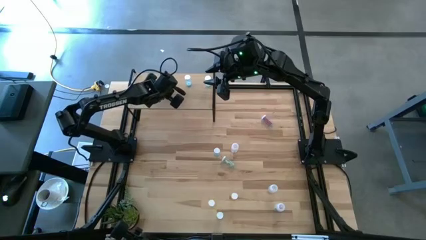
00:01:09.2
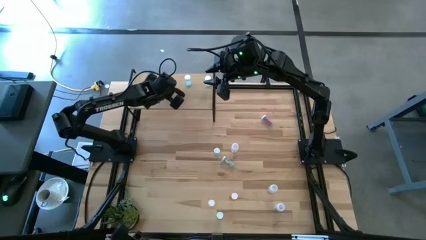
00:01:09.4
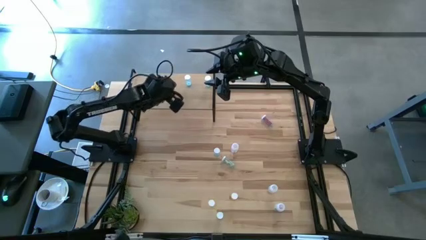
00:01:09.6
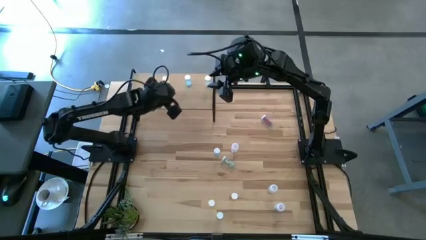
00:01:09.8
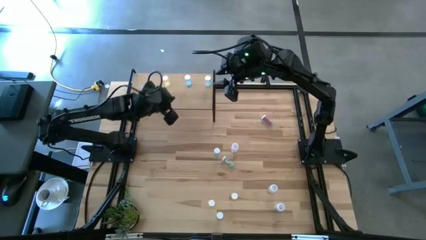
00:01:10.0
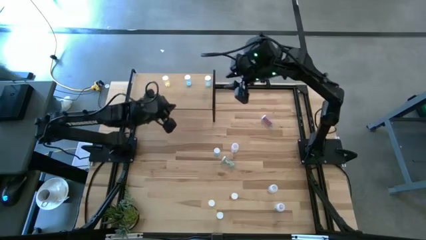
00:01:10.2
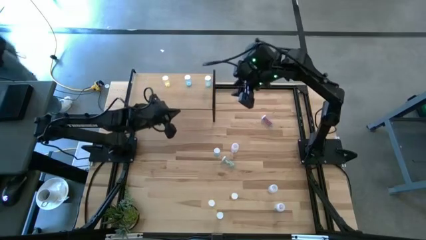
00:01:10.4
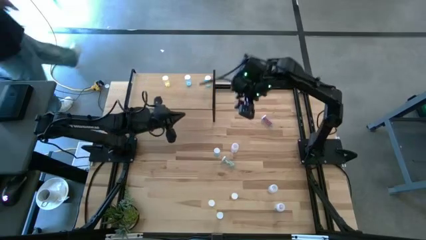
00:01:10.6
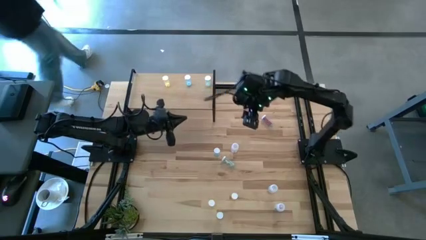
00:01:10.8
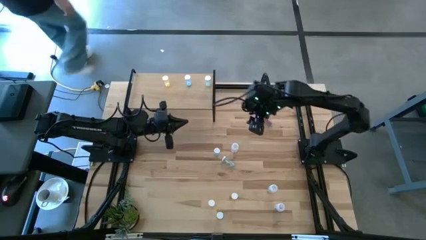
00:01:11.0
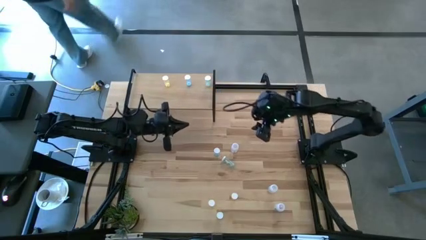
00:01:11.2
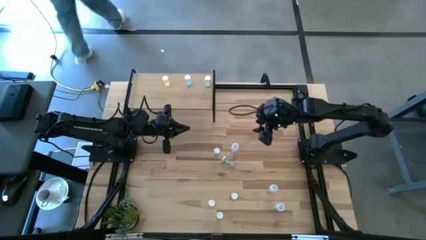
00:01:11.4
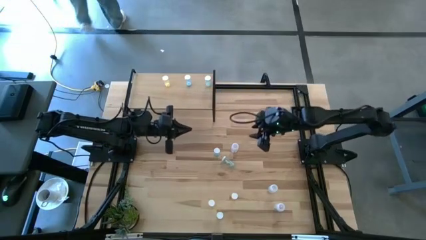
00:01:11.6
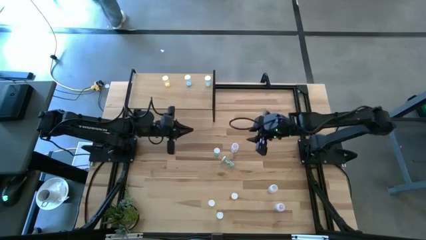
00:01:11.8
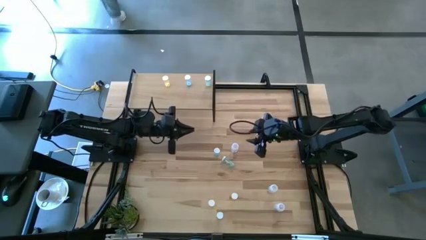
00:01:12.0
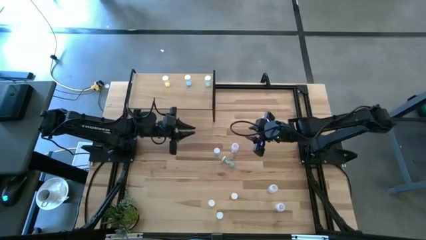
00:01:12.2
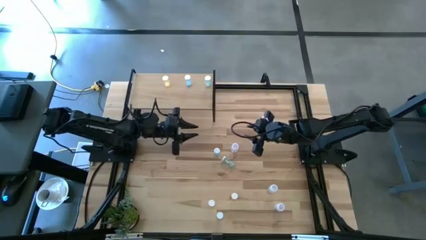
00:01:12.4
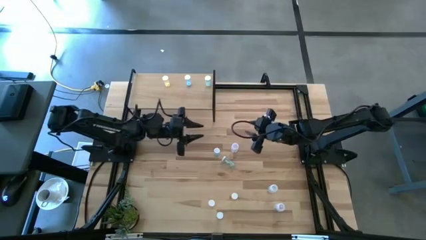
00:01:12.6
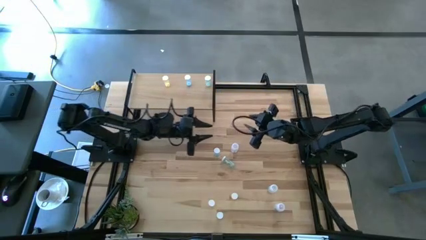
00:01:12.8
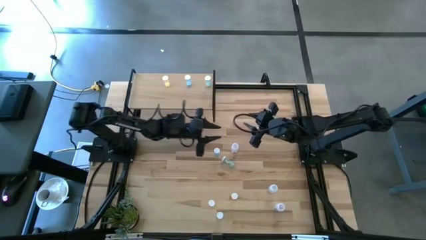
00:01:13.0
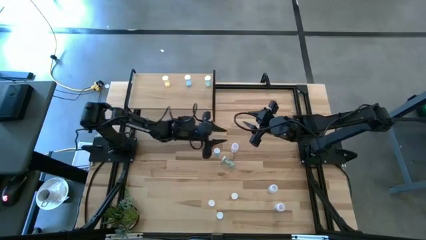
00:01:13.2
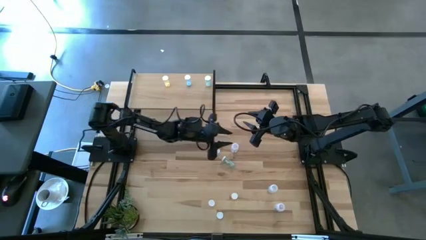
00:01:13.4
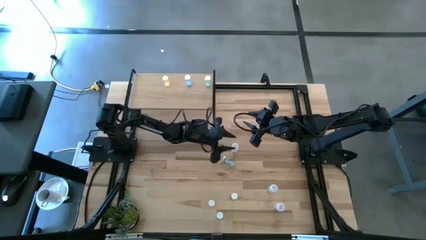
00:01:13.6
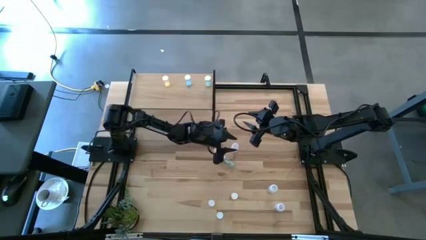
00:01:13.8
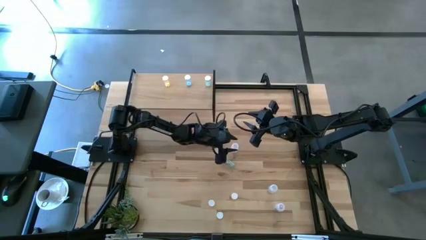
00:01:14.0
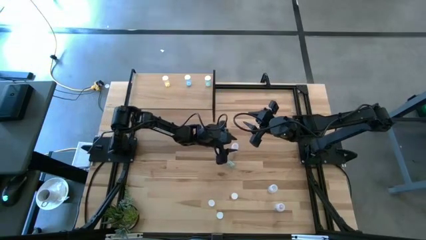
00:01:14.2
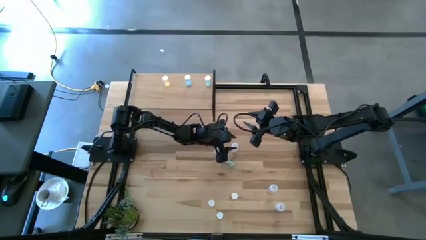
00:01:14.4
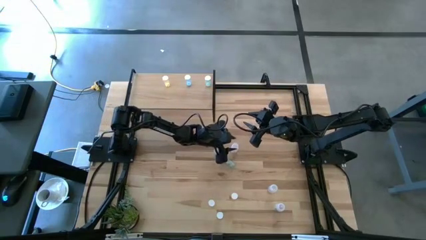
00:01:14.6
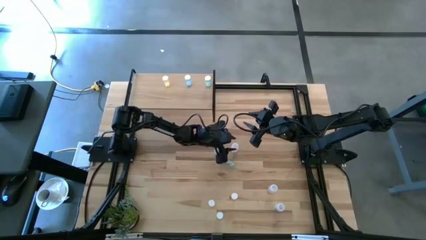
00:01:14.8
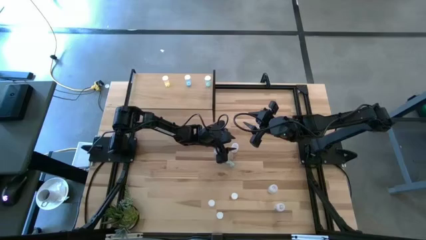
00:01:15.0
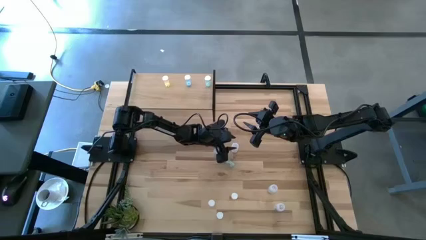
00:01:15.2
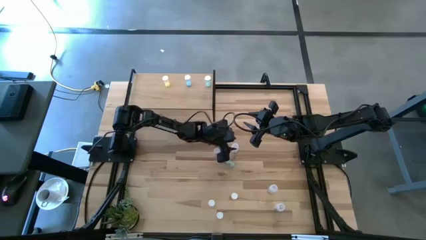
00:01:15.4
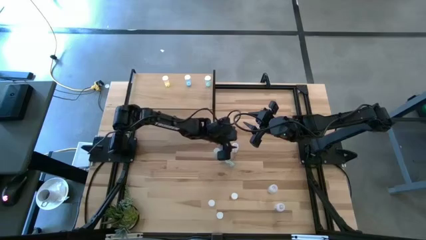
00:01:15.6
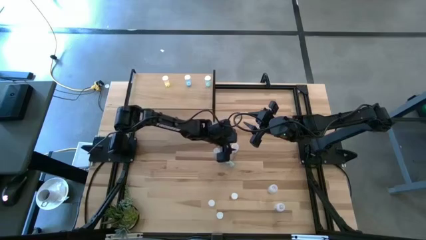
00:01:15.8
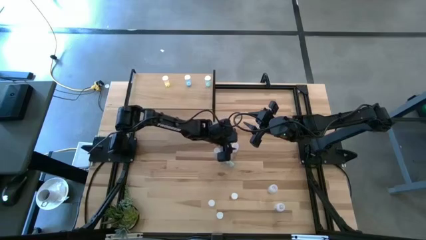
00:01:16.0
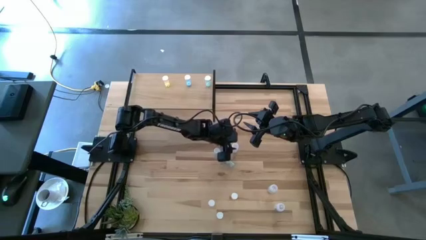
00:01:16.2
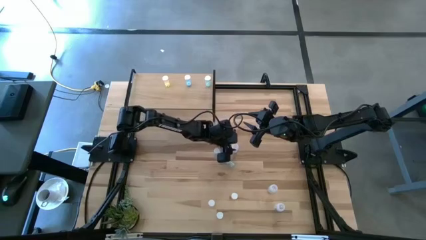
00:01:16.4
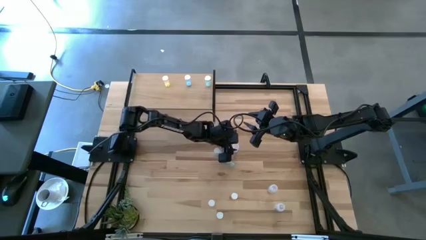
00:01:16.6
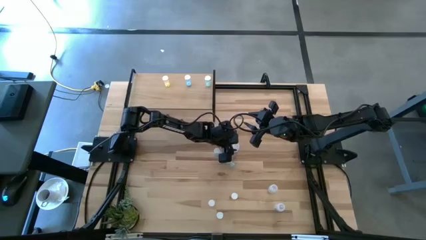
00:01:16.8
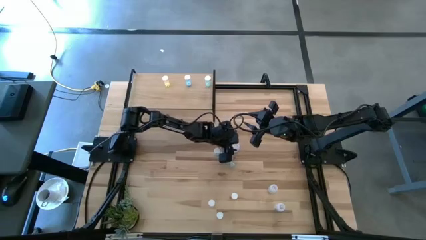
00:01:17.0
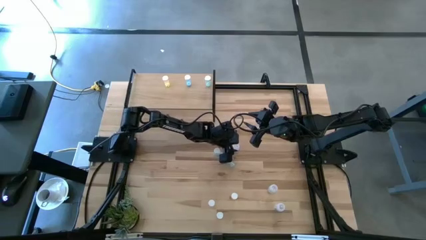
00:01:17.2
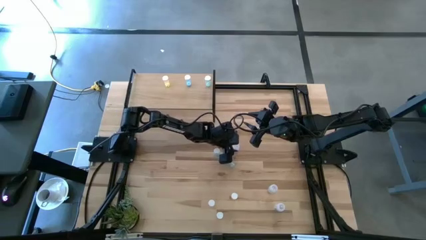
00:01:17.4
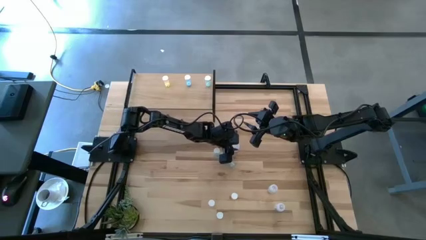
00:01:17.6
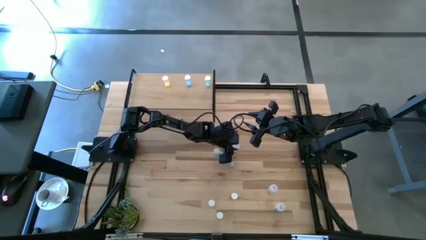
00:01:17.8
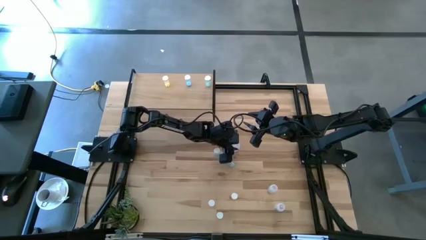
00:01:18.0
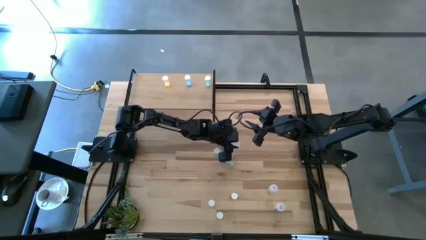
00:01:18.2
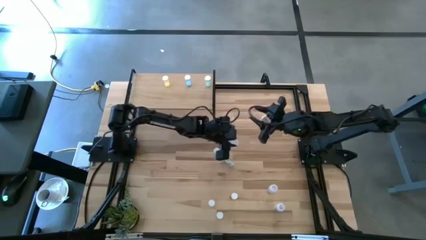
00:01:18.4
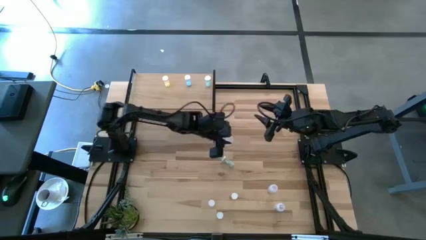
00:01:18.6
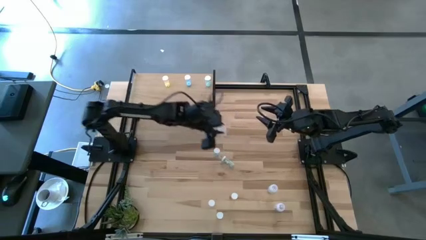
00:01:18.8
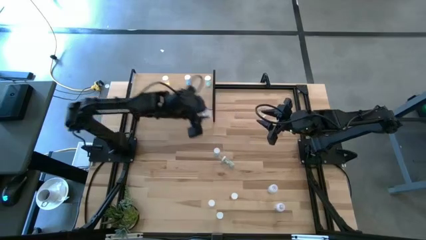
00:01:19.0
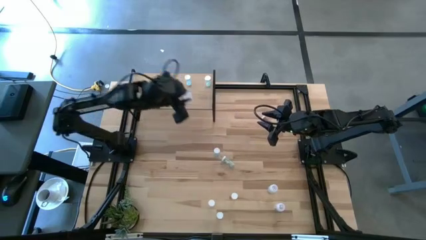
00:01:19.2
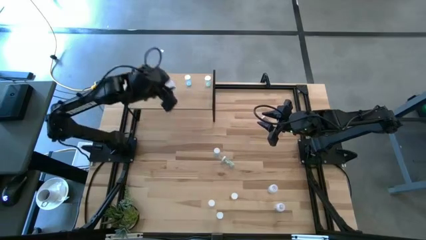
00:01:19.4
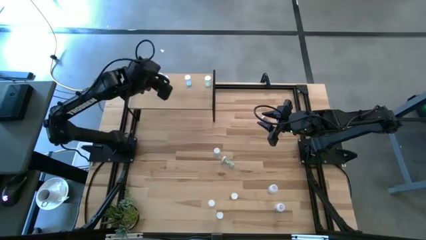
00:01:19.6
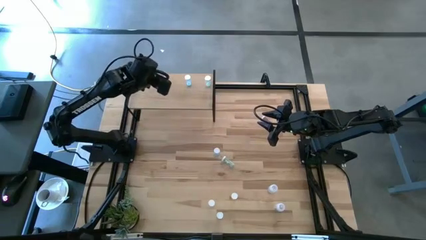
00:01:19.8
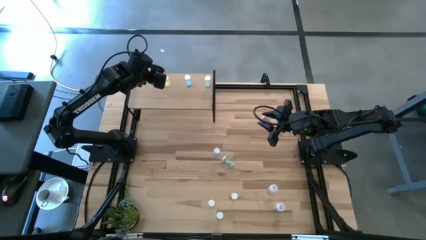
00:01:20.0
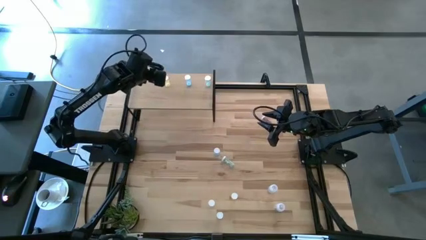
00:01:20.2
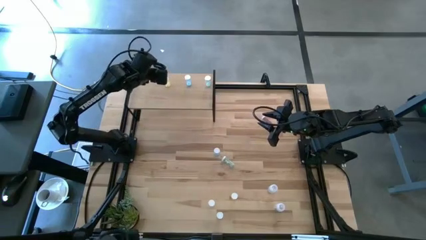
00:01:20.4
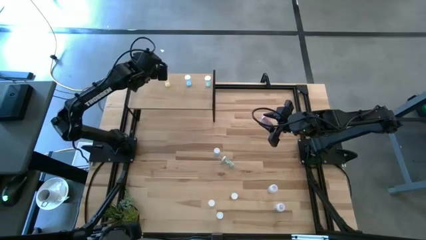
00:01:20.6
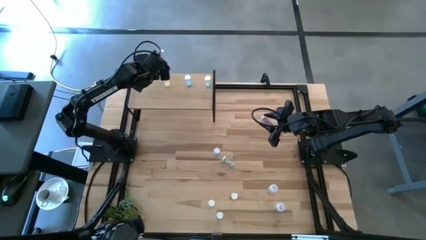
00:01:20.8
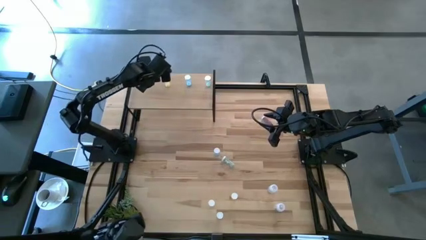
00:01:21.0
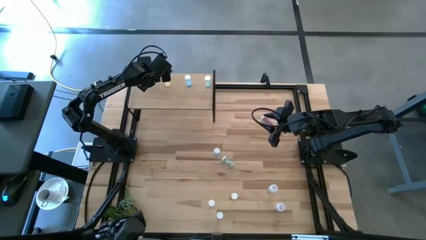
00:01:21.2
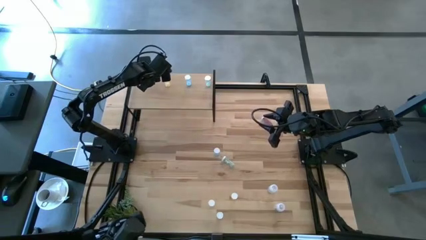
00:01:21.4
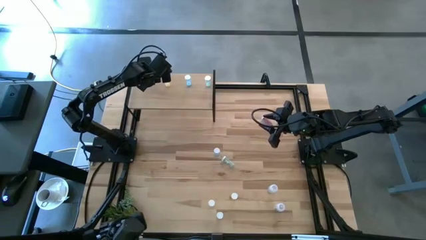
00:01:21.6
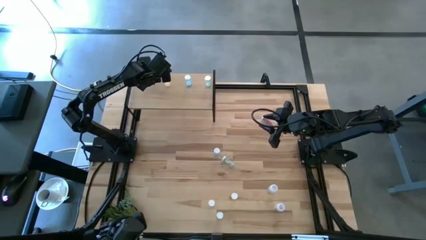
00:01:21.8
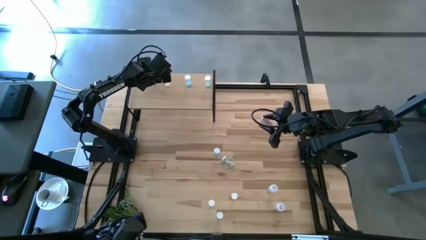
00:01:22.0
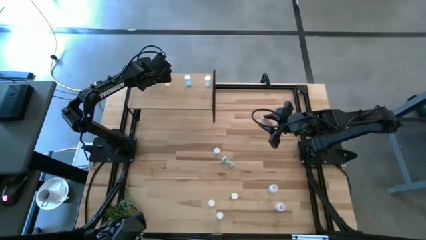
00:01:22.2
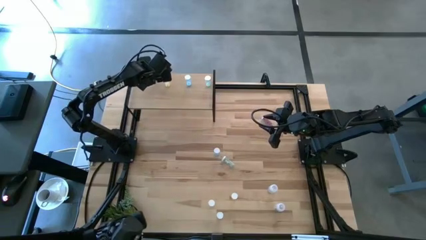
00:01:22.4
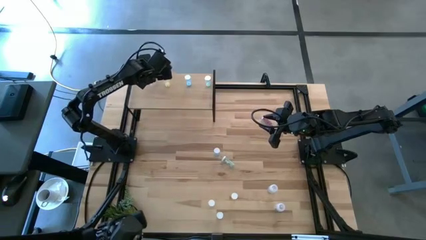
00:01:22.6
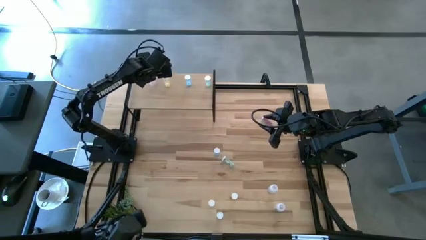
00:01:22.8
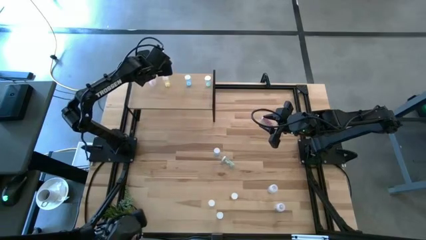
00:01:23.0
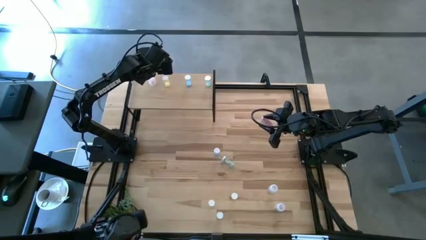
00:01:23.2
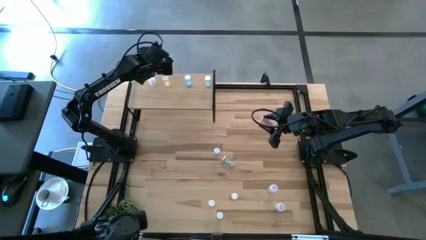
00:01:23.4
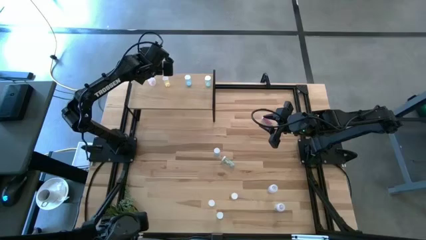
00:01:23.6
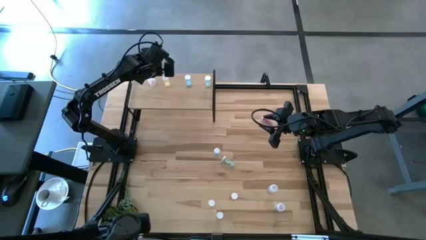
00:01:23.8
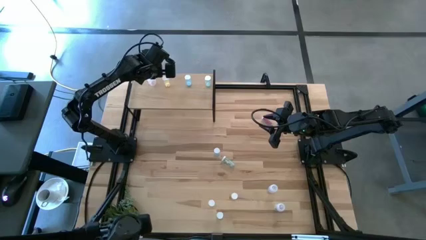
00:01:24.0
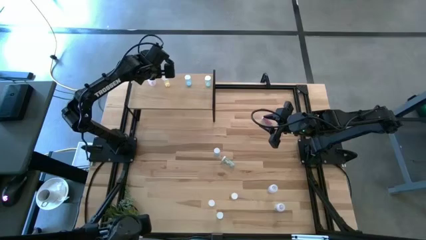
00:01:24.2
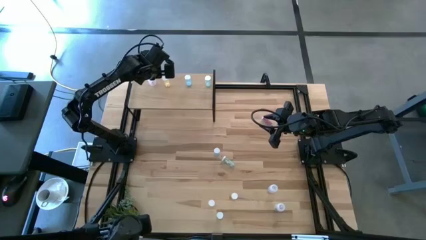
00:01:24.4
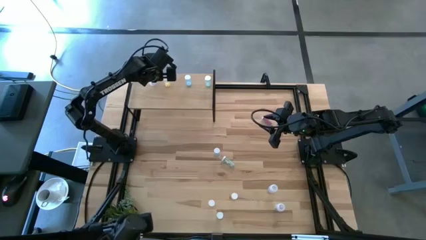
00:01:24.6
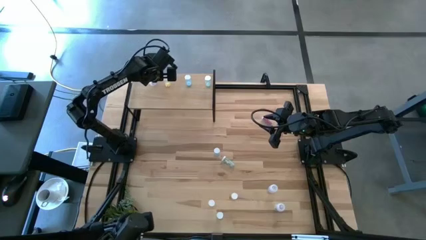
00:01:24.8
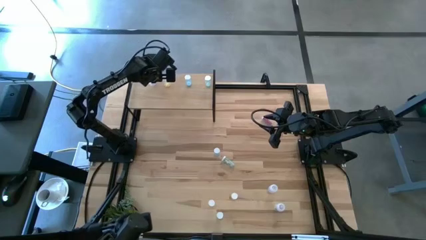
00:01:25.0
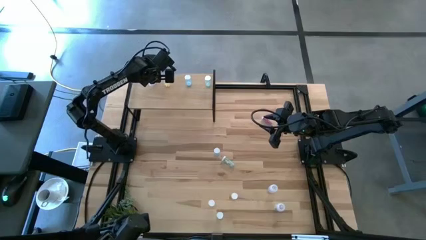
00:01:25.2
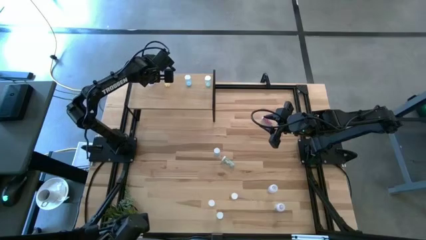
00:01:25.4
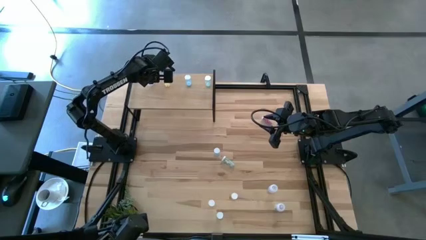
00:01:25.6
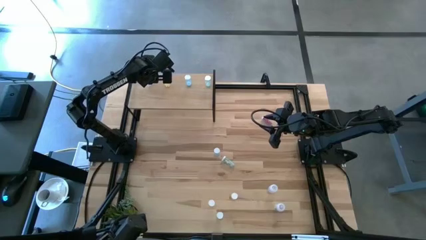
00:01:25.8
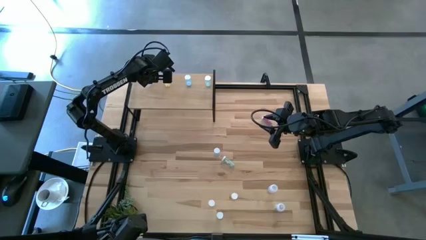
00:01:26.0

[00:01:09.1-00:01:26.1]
Task: Pick and place medicine bottles onto shelf by color
Put the top white pill bottle on the shelf
